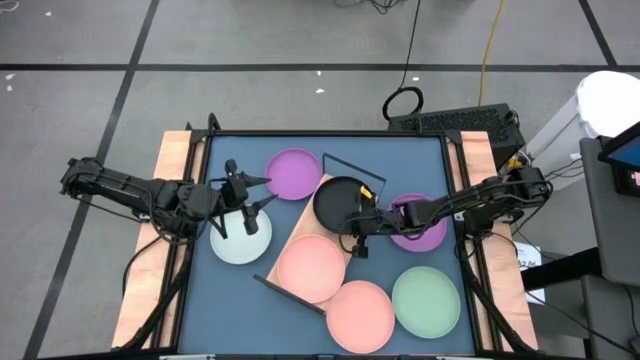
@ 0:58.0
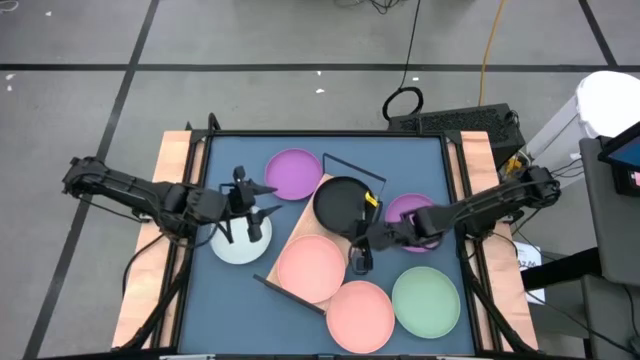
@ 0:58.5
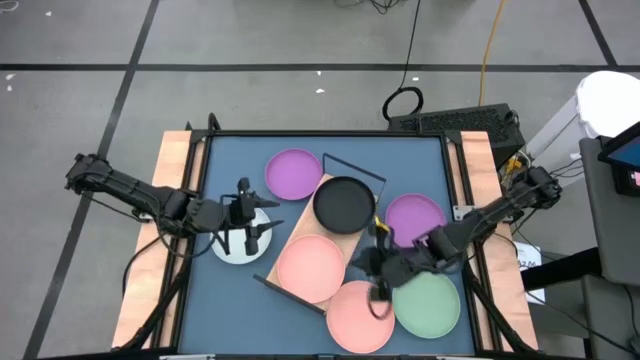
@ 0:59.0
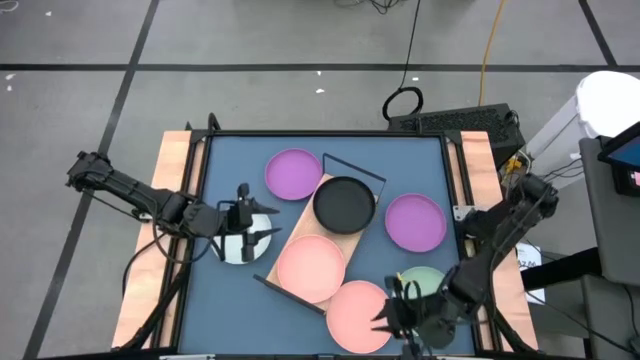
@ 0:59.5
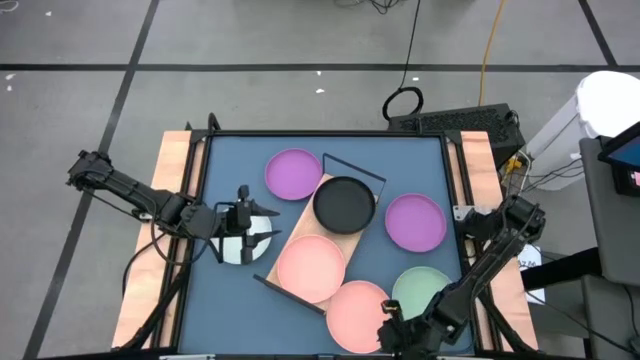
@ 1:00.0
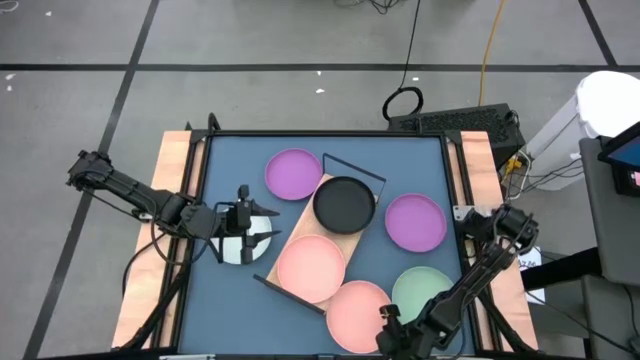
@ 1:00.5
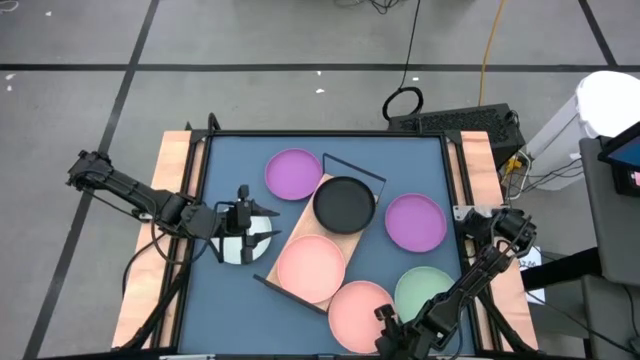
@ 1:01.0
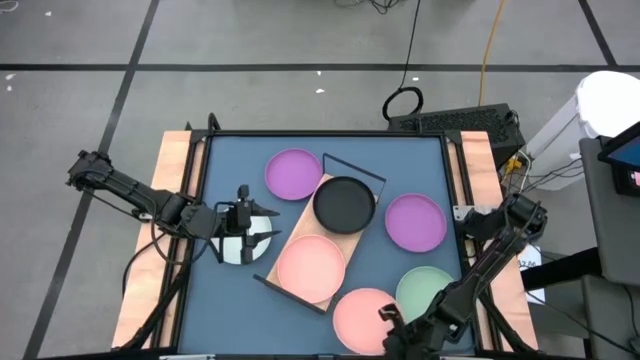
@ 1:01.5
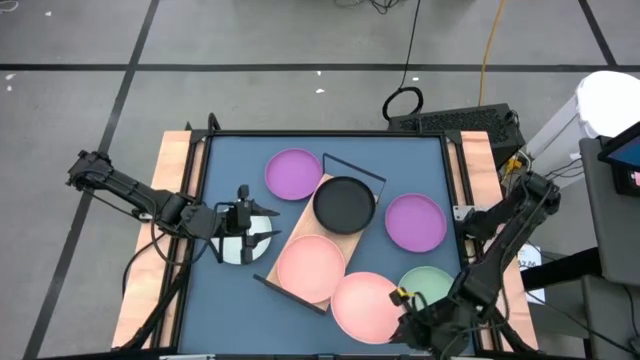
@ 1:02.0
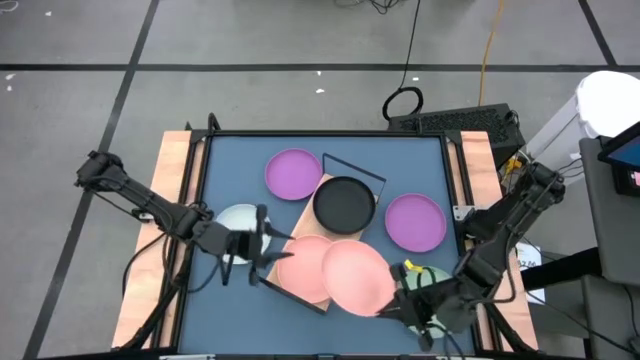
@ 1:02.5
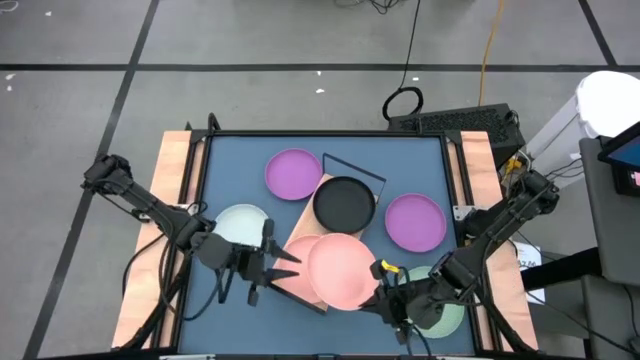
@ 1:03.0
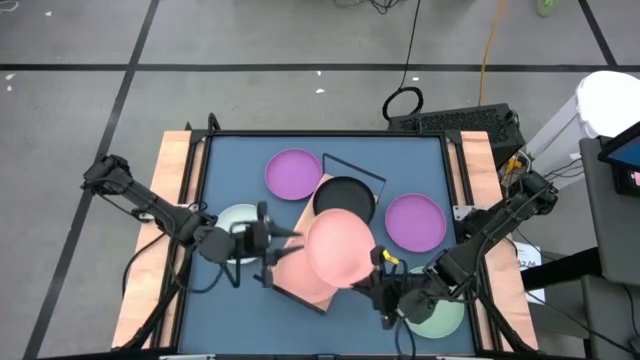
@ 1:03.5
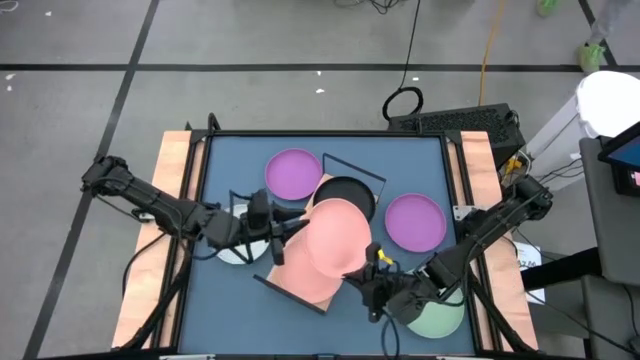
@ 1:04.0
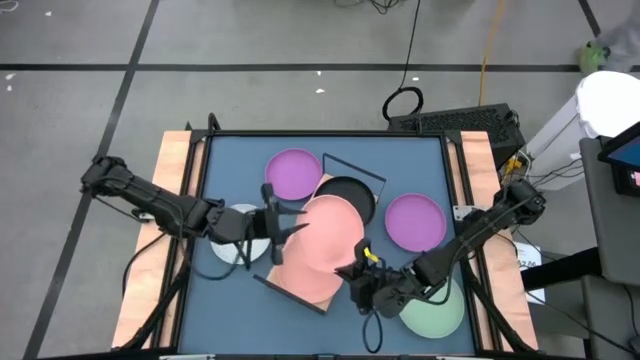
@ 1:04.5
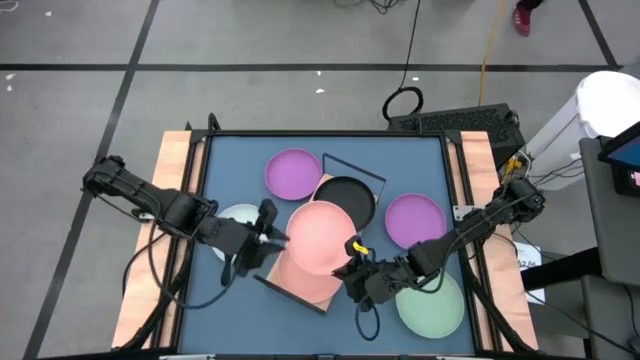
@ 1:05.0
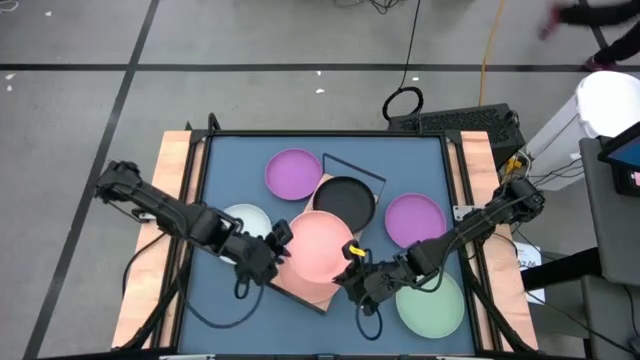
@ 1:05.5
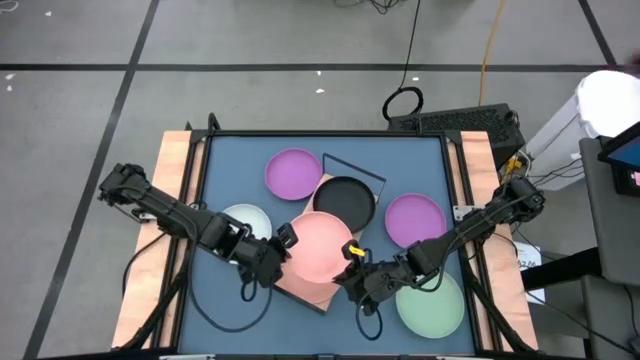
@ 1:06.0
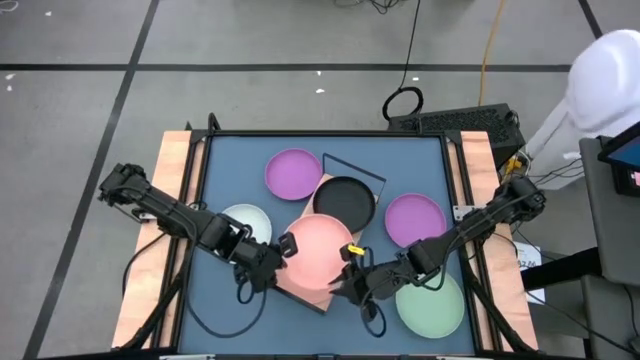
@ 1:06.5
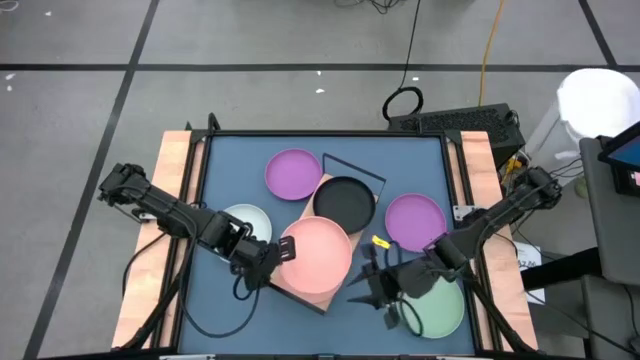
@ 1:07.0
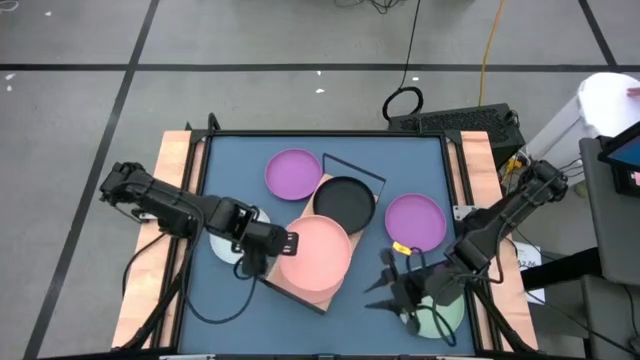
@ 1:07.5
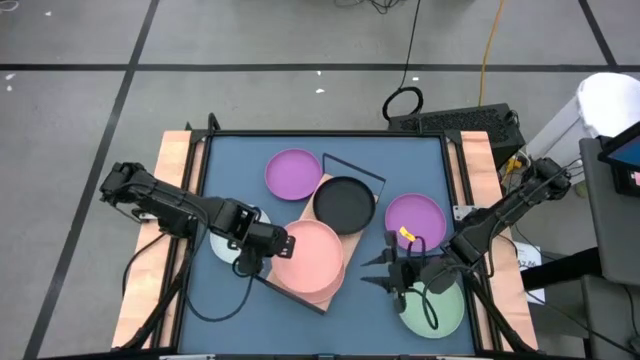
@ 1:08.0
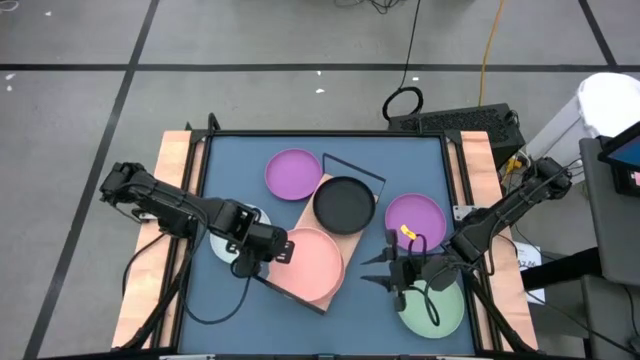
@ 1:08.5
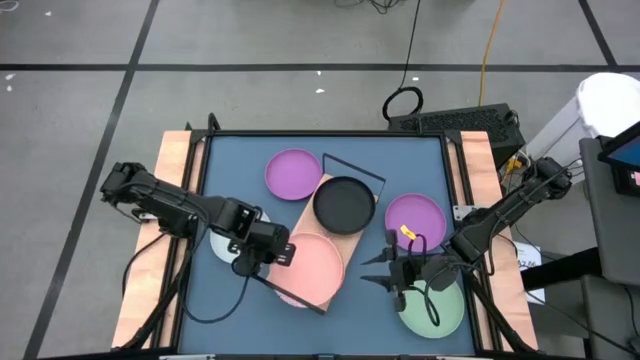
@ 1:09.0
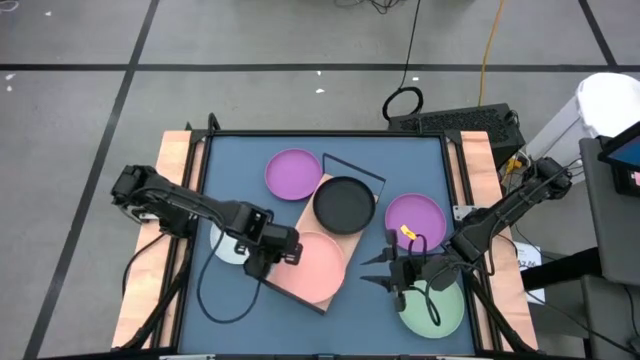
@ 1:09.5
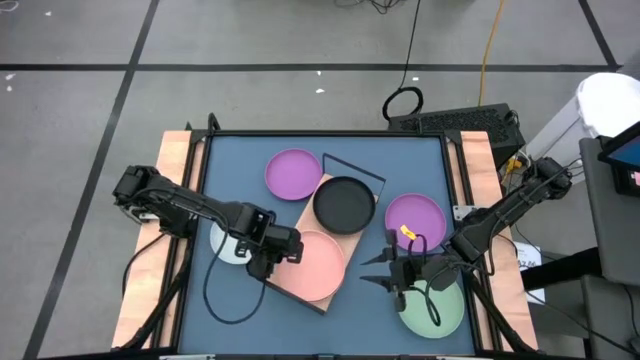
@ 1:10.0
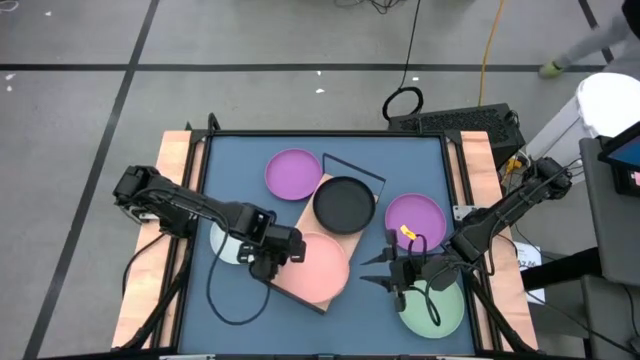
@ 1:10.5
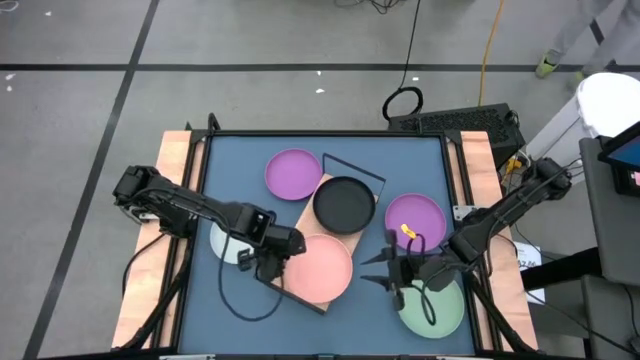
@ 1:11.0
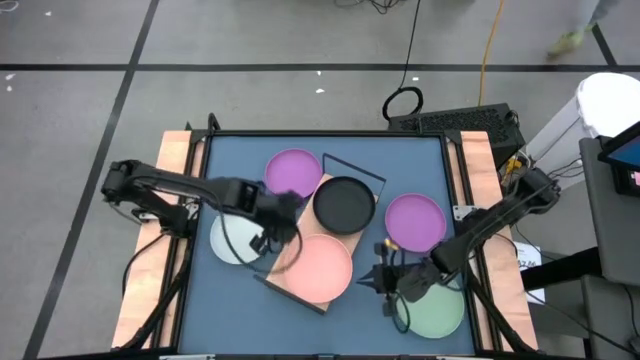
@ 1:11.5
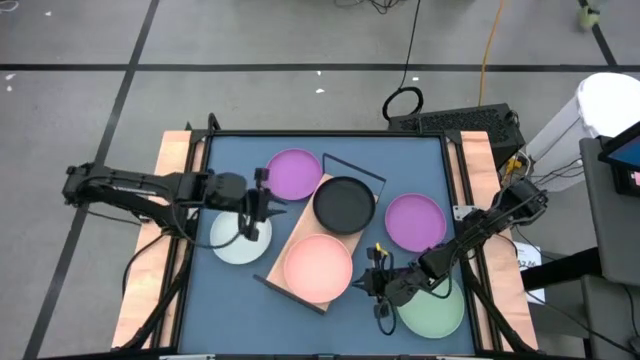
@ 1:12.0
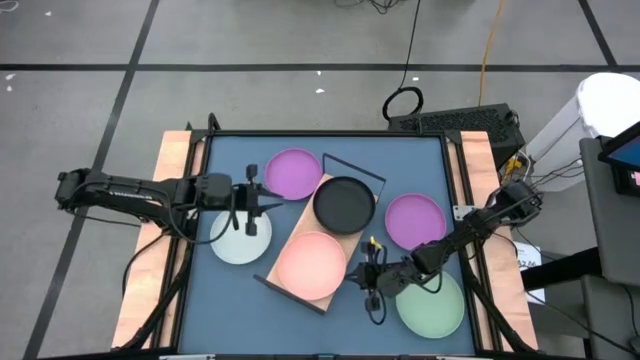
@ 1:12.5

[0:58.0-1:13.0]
Task: Place and stack plates onto a shelf
Stack the pink plate on top of the pink plate on the shelf

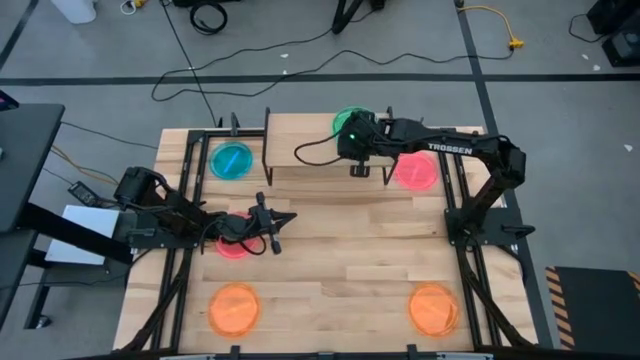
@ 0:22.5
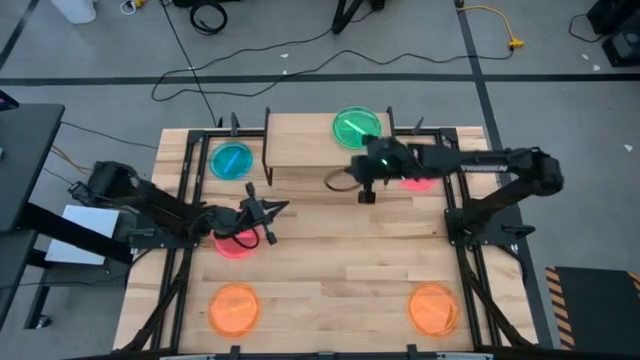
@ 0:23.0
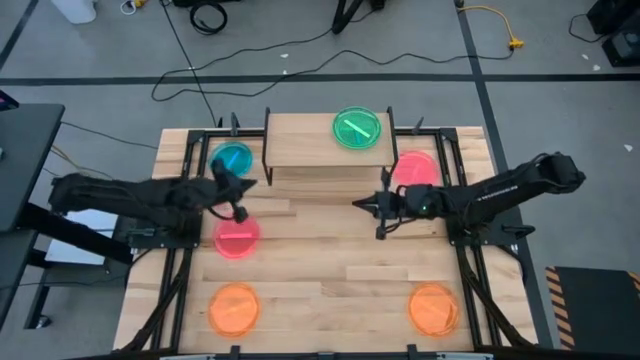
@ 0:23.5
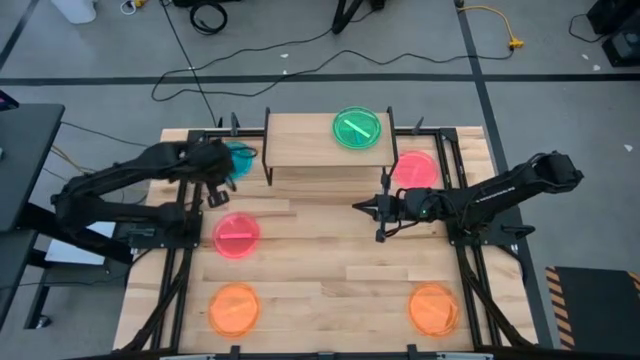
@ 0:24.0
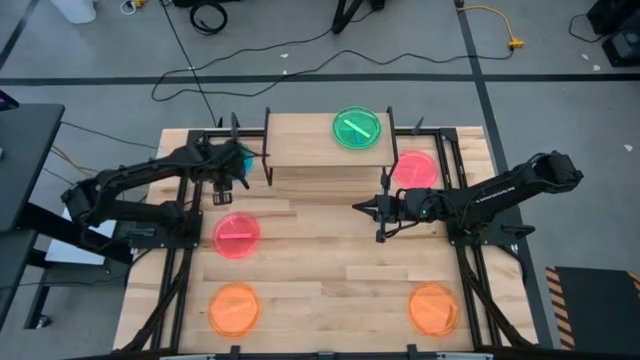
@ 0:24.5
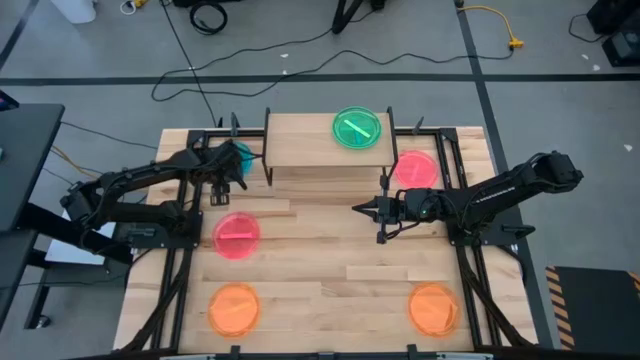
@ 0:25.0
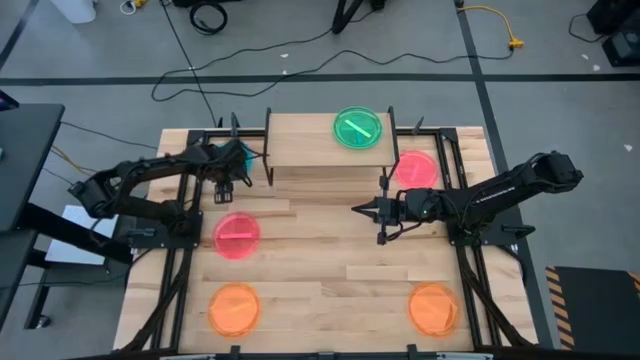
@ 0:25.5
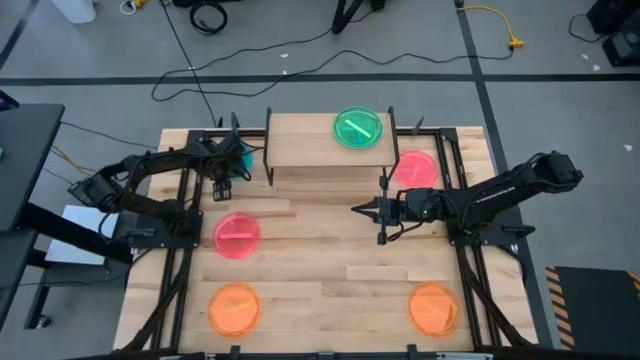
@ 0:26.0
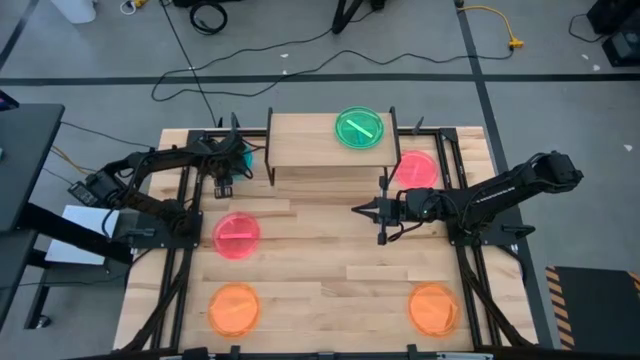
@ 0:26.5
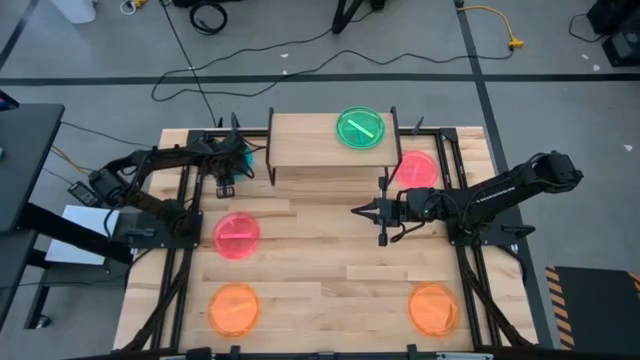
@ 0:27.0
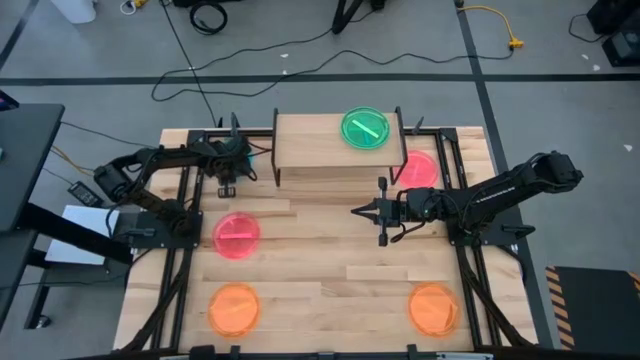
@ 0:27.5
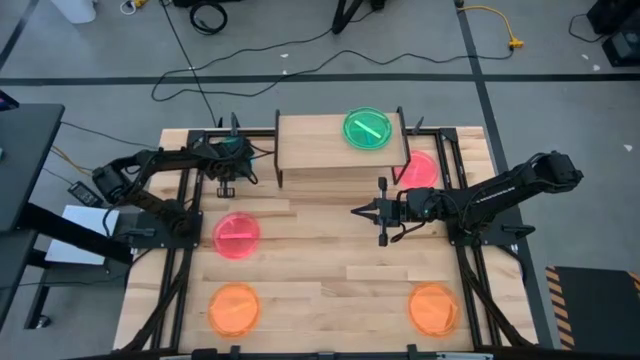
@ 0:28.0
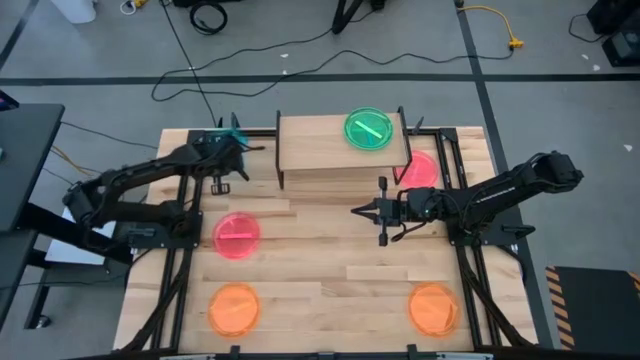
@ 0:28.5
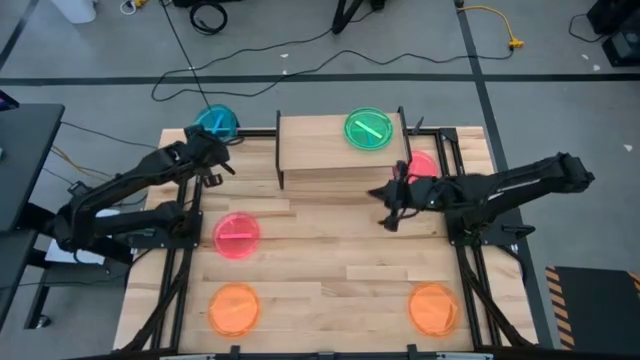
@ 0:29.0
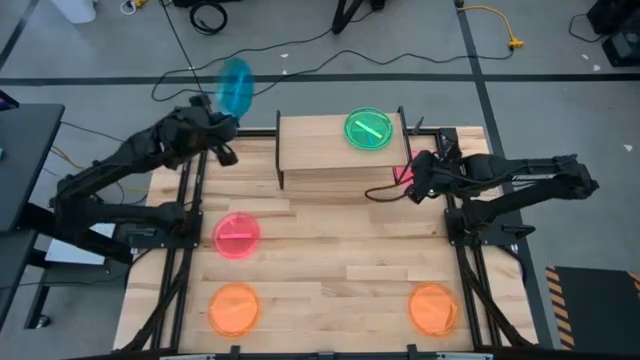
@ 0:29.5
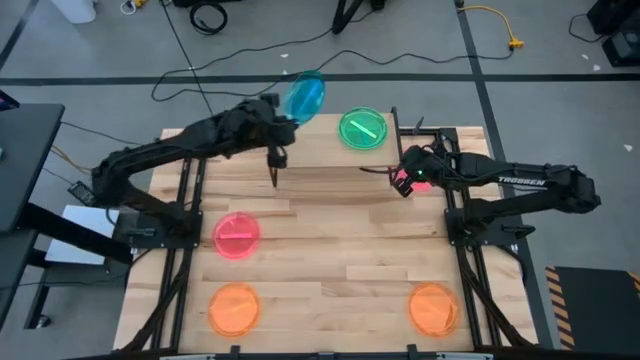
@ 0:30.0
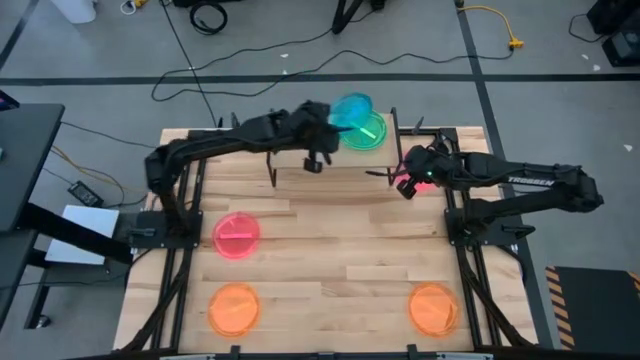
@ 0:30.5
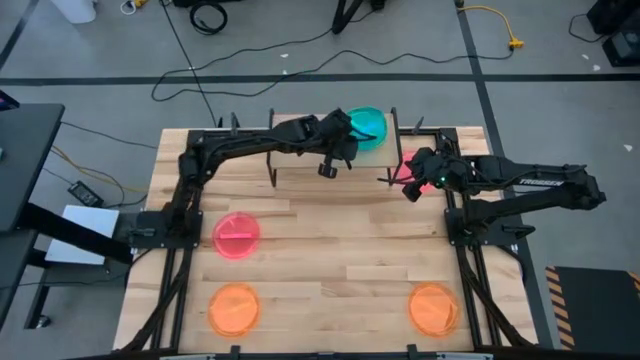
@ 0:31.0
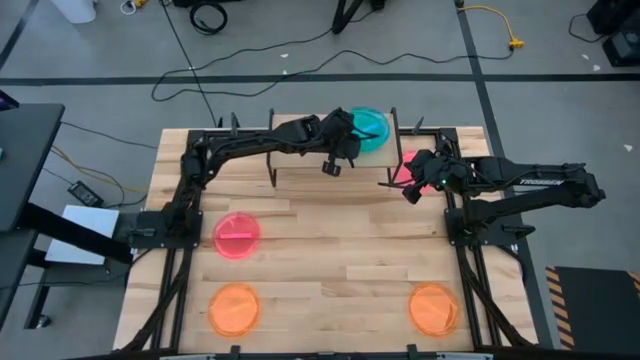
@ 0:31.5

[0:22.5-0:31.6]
Task: Place and stack plates onto a shelf
Stack the blue plate on top of the green plate on the shelf
